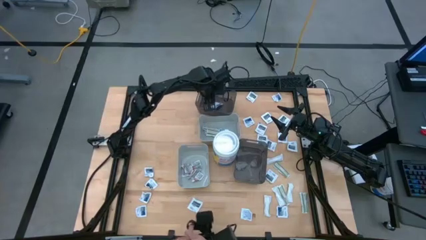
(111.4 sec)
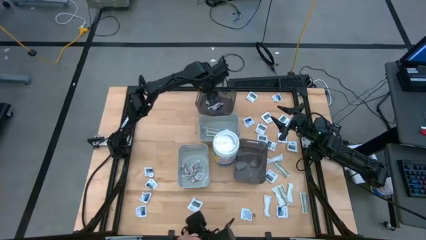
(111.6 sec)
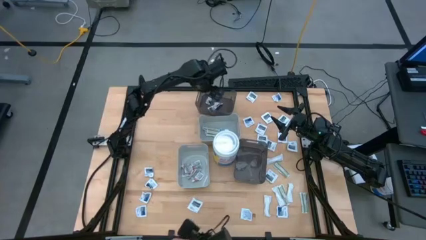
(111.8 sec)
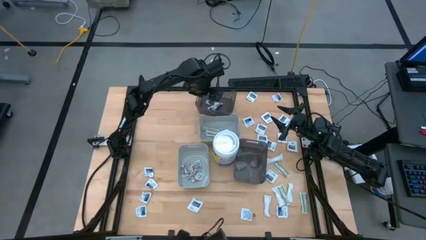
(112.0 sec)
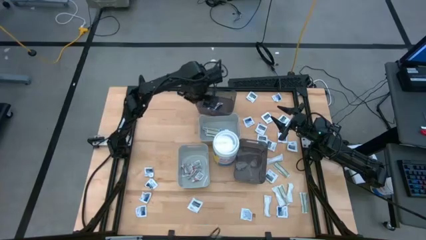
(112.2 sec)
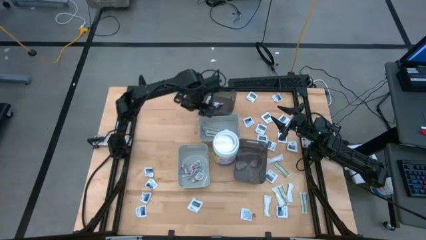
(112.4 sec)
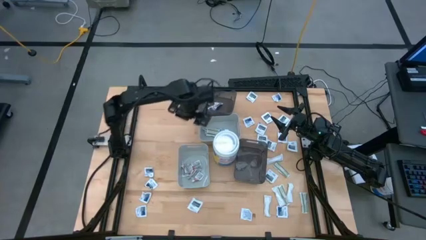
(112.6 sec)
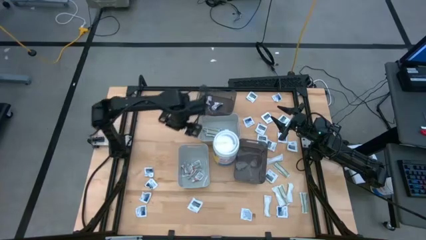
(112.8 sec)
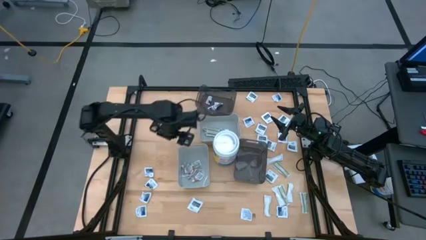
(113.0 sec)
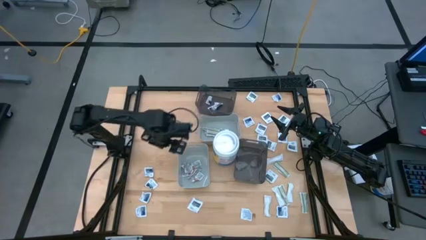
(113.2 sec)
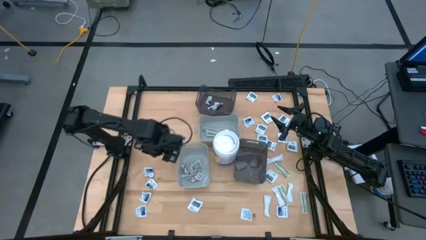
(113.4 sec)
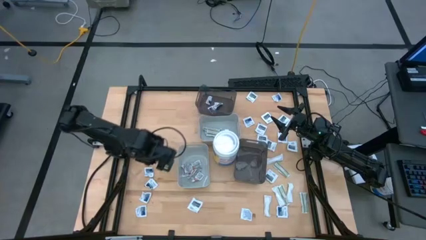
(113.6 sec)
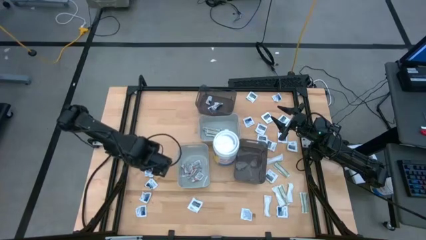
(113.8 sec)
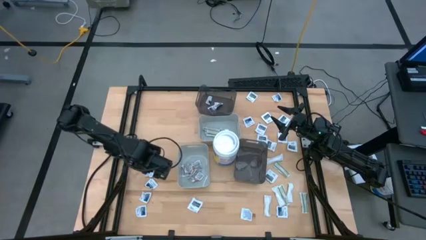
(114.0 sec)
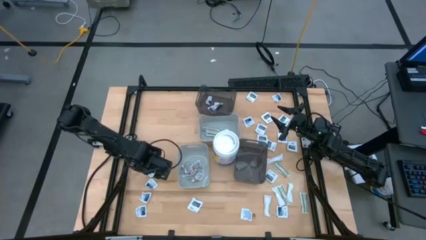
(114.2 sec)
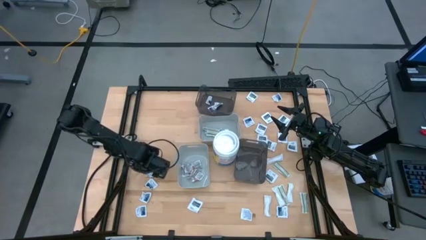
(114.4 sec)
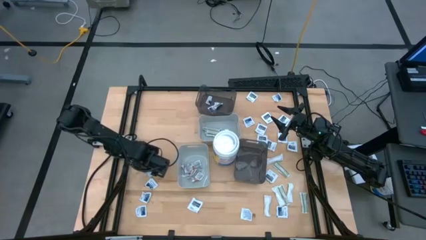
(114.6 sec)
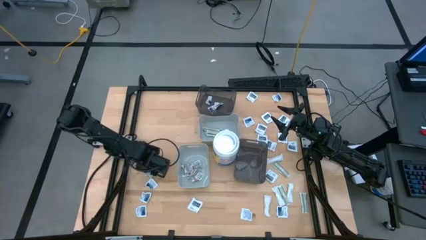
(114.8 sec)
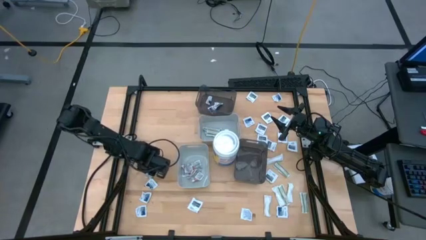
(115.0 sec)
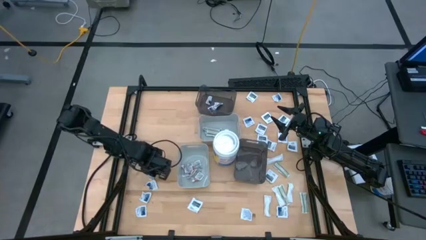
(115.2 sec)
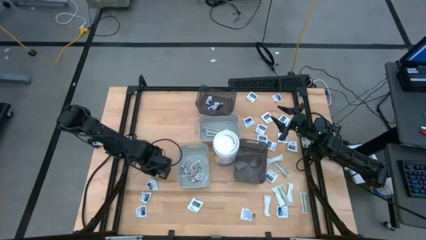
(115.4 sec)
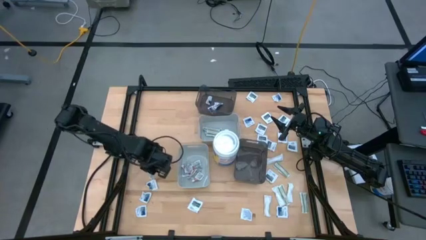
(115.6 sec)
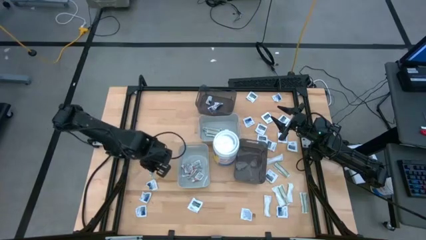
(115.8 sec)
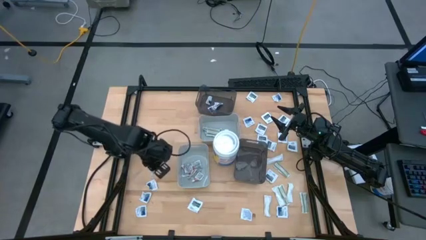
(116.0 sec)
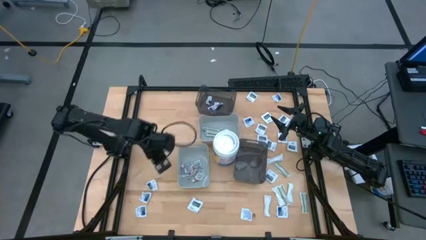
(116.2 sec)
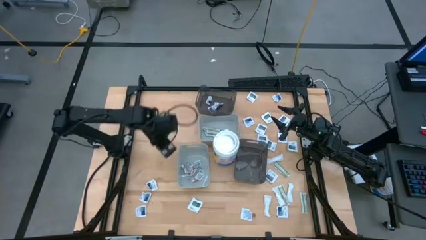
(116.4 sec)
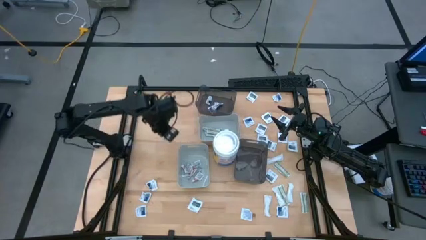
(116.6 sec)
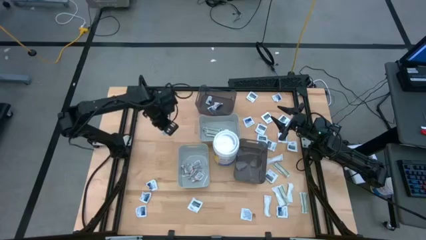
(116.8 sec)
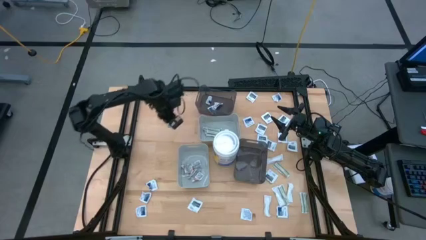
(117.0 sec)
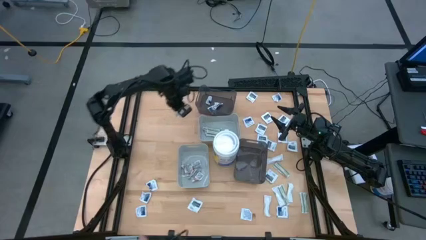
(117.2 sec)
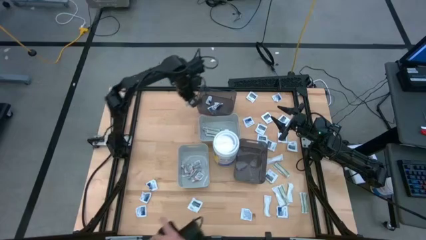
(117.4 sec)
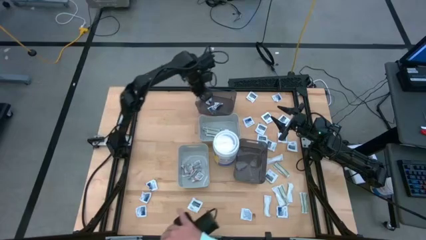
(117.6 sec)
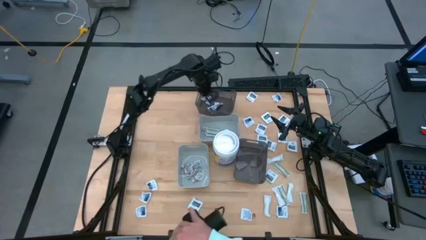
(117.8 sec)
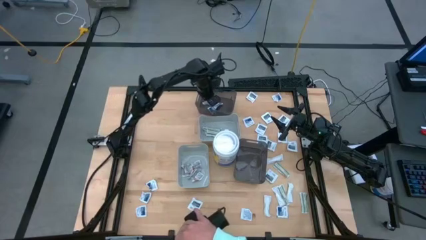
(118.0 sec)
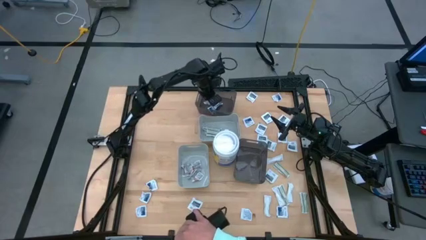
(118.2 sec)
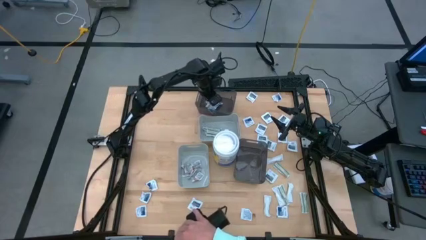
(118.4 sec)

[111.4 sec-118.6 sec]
Task: Pick & Place First Aid Supplies
Put the alcohol pad into the top transparent black bin

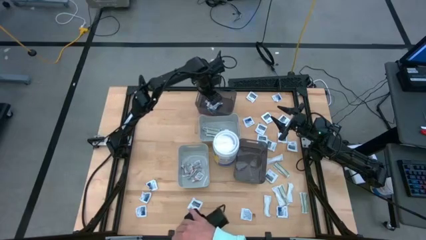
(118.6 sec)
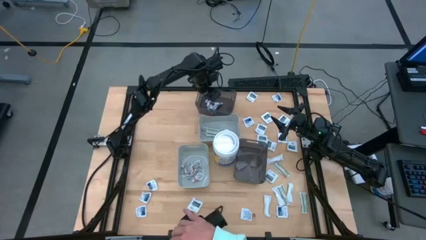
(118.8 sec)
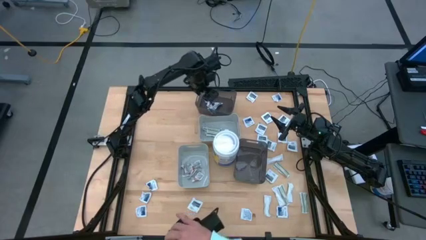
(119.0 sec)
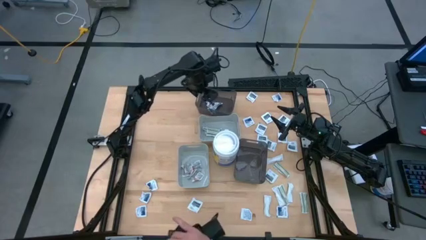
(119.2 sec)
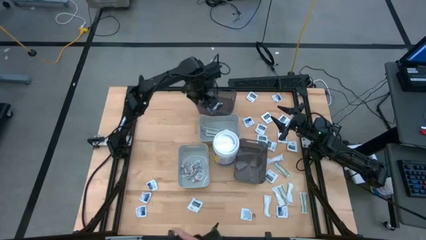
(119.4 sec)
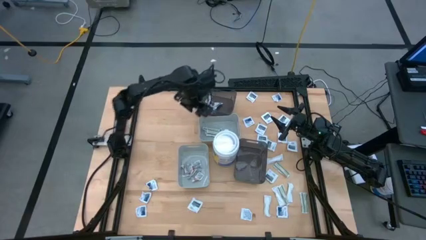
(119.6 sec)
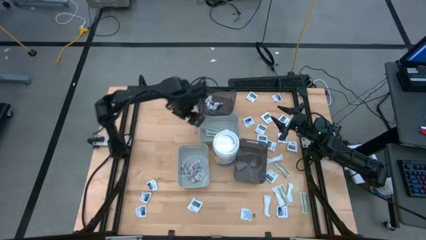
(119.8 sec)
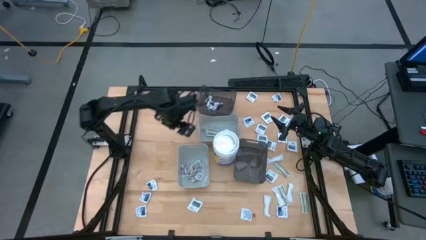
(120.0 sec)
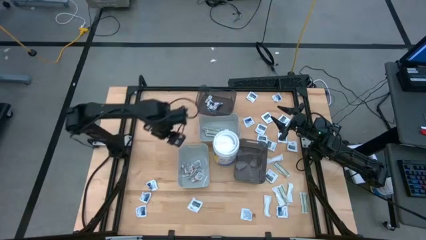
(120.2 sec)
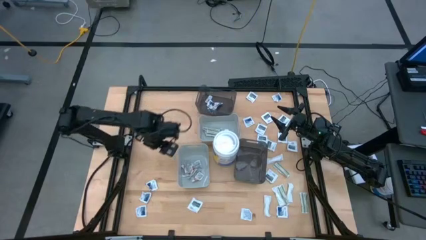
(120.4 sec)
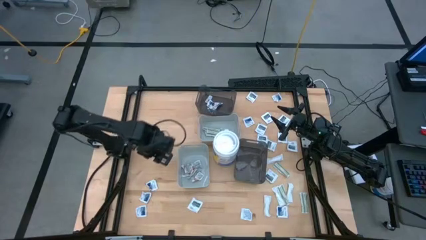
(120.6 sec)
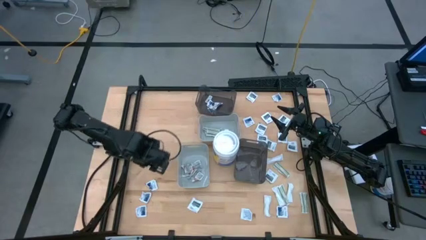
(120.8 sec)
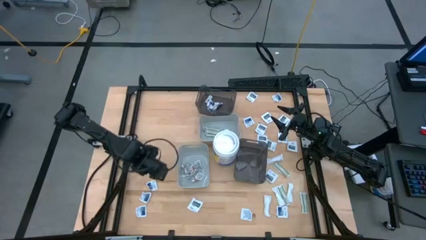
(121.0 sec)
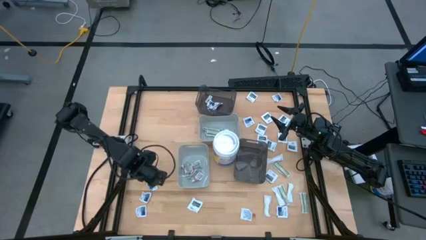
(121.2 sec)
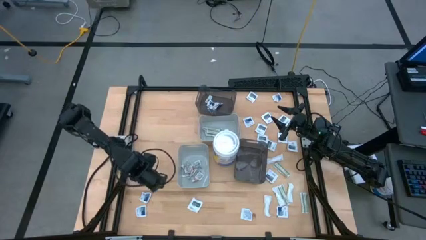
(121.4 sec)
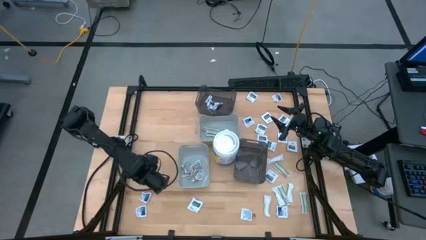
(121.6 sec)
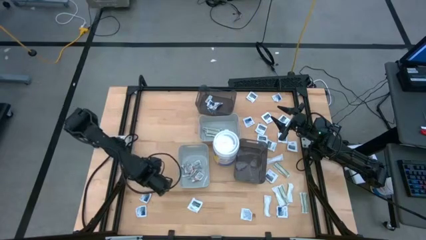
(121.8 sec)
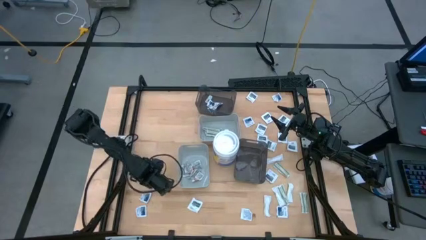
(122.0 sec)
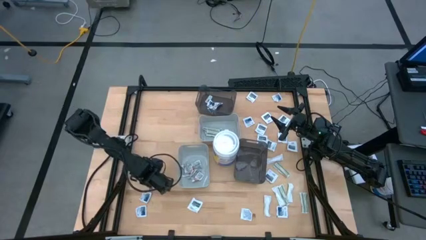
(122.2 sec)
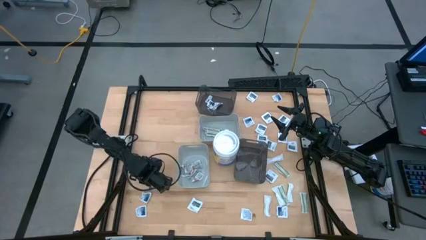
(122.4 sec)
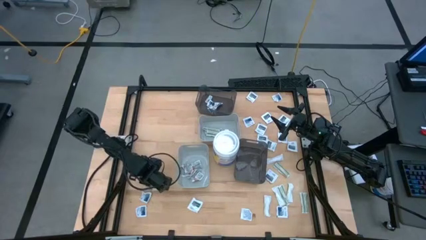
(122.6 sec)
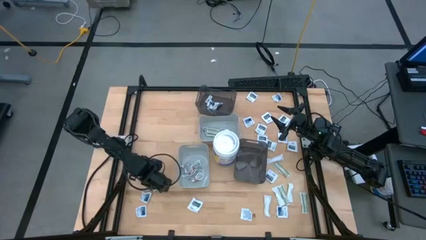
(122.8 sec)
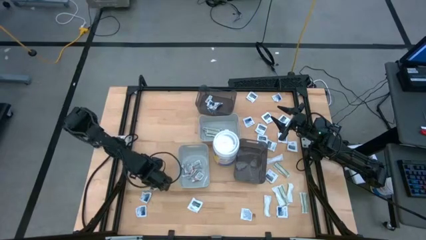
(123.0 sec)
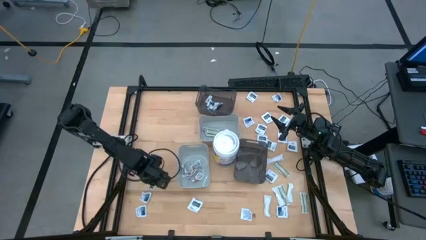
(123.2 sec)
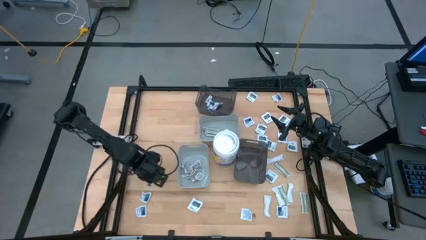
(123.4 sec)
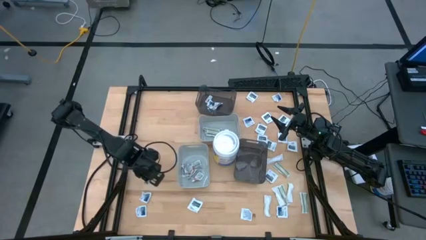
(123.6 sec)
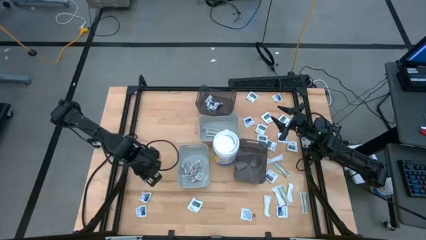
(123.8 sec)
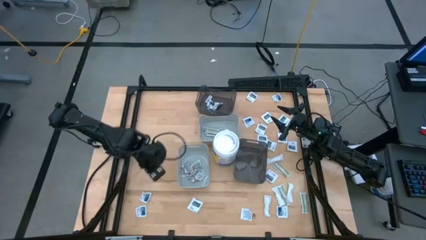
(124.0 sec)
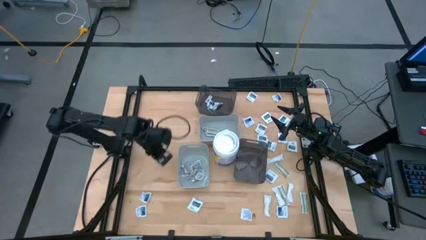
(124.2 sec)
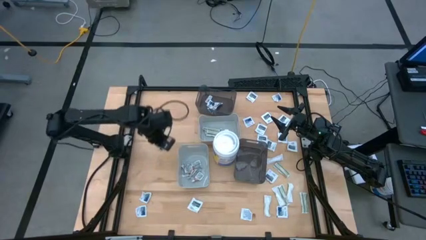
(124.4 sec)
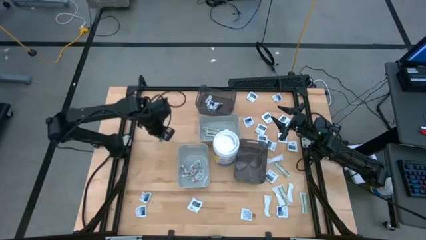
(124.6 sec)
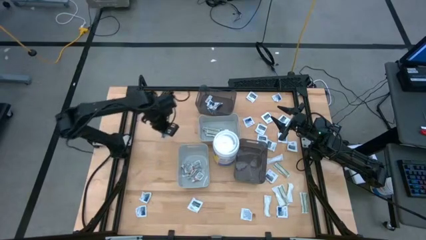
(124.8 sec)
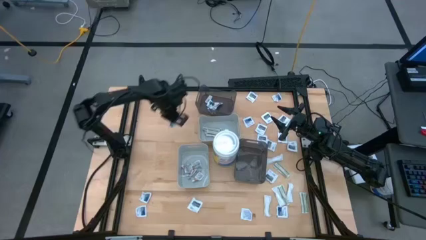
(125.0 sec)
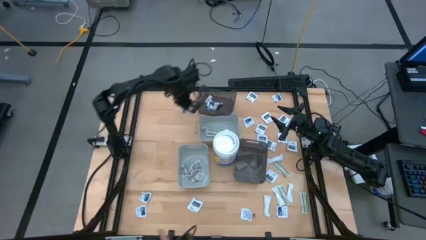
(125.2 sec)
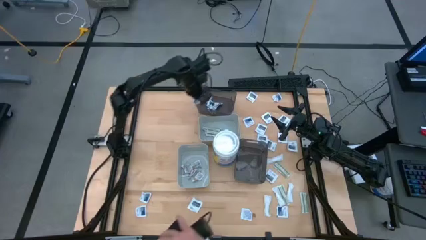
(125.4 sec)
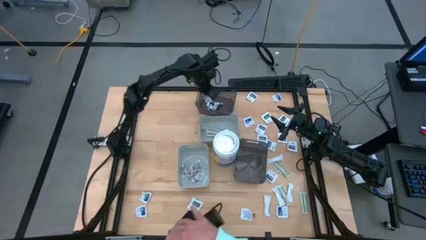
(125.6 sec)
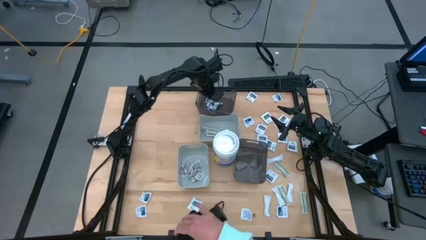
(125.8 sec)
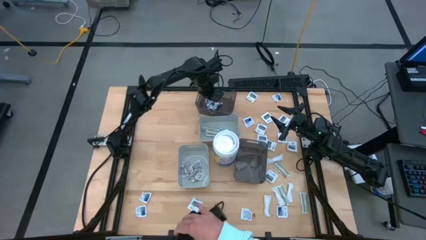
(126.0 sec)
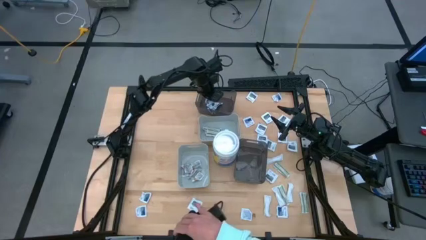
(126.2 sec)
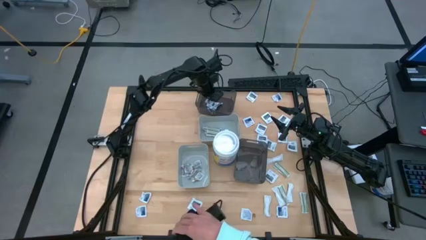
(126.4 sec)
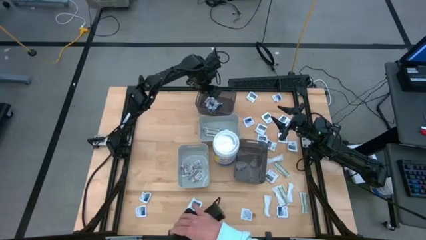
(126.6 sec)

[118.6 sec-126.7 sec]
Put the alcohol pad into the top transparent black bin

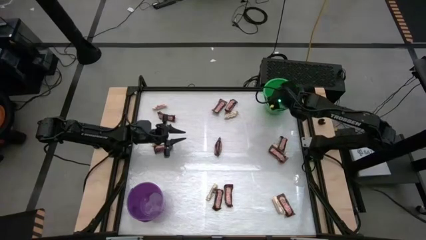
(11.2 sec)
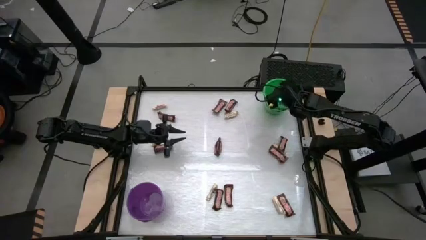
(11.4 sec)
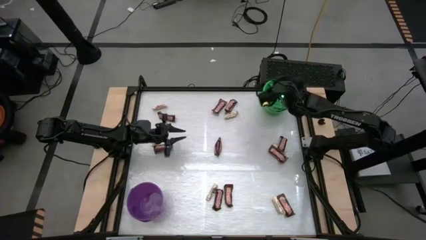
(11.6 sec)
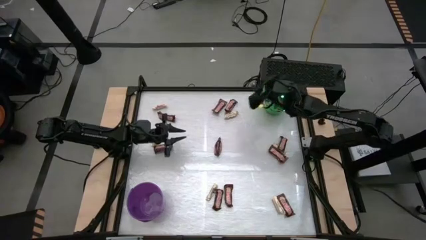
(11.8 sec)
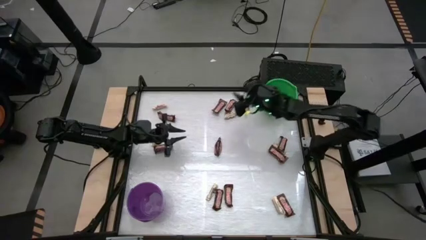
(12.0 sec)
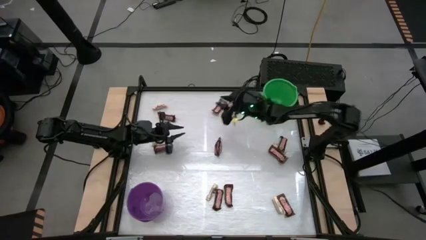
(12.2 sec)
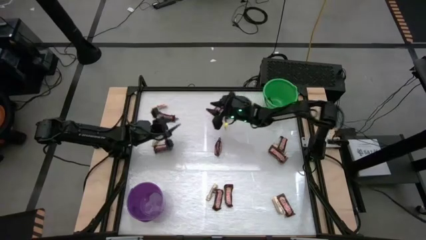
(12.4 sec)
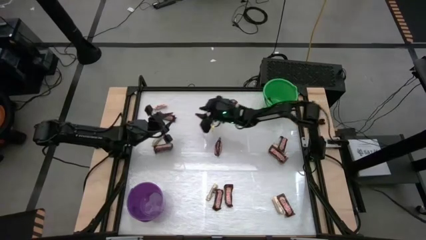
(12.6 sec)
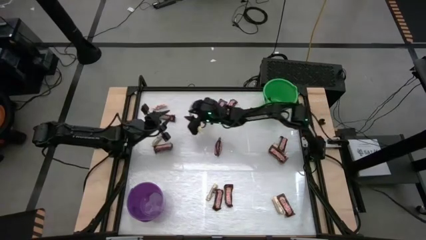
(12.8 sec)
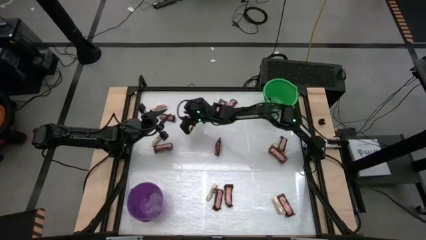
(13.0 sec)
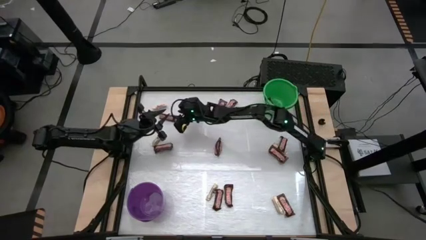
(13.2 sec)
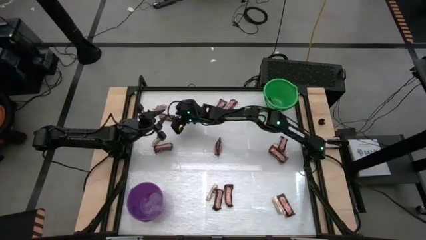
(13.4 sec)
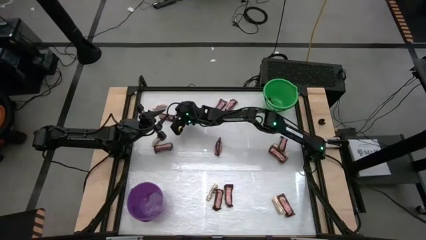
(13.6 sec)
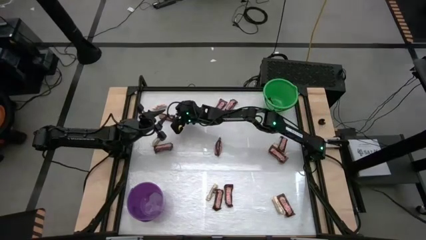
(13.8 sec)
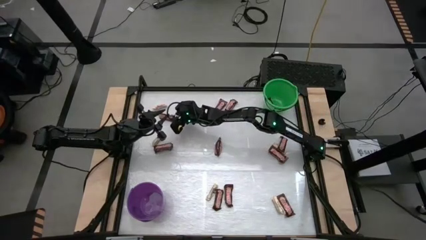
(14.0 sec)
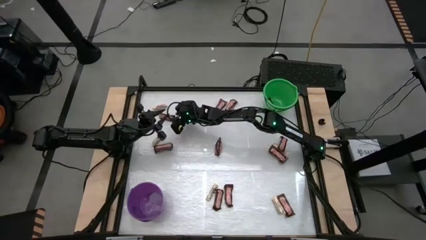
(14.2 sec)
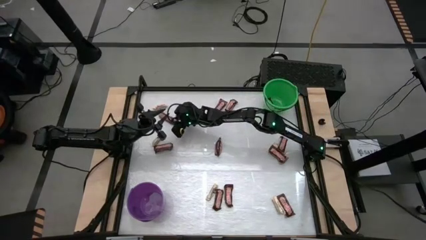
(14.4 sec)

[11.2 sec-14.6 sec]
Task: Sort candy by brand, put in halloween buckets
Put the brown candy bar into the green bucket
